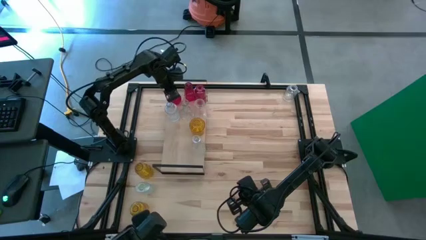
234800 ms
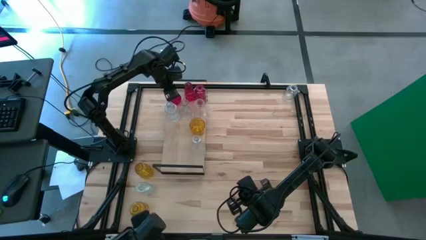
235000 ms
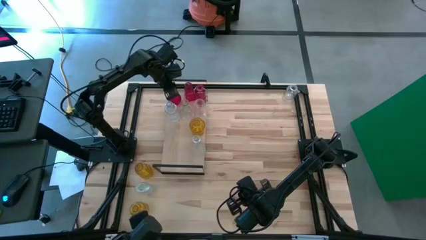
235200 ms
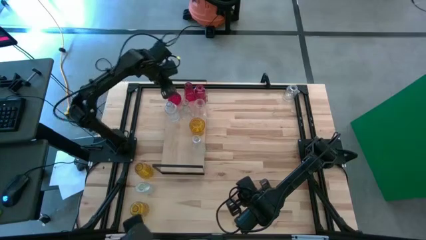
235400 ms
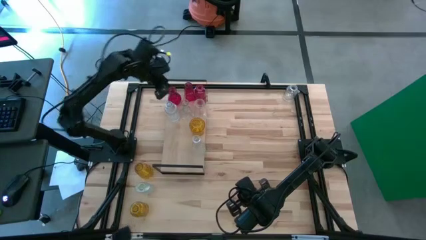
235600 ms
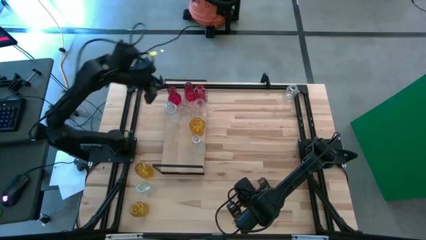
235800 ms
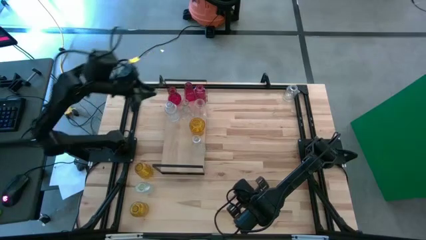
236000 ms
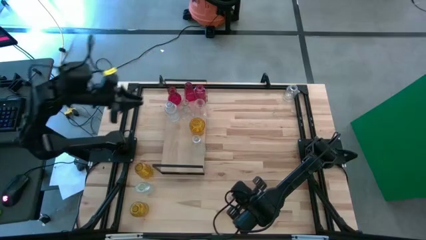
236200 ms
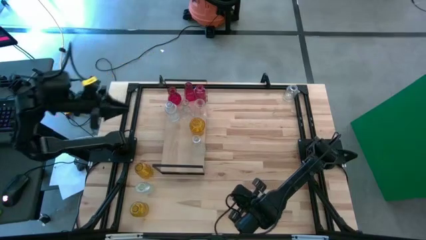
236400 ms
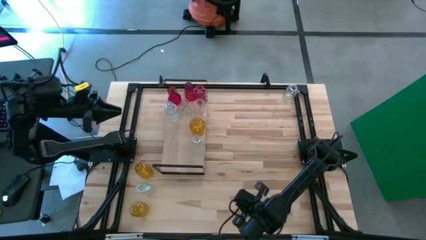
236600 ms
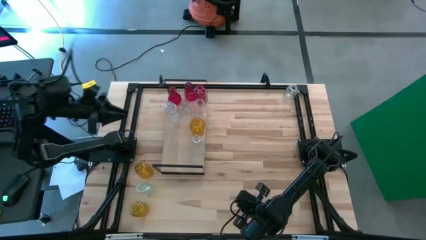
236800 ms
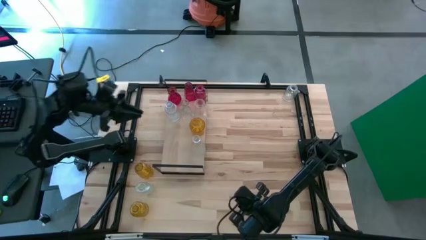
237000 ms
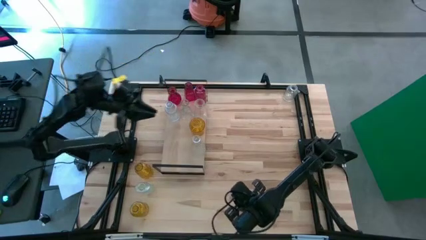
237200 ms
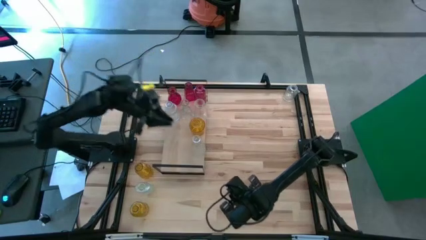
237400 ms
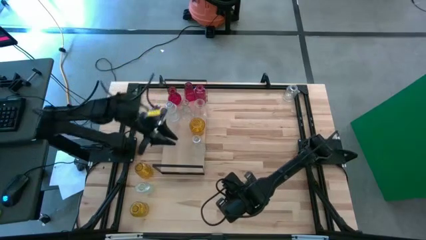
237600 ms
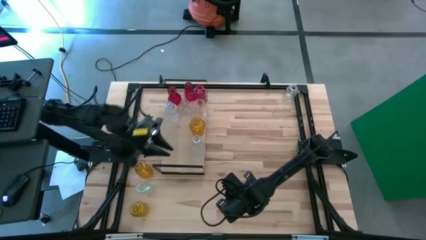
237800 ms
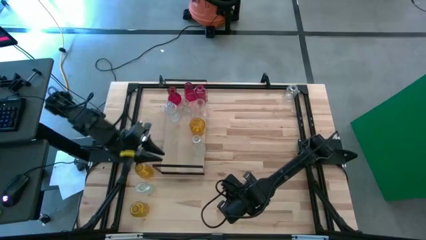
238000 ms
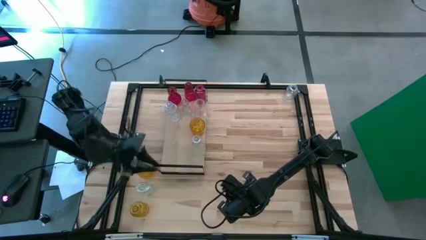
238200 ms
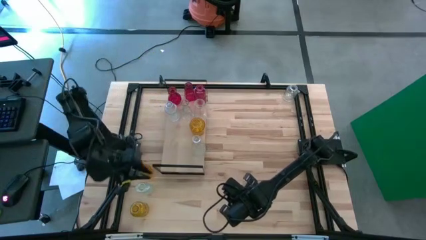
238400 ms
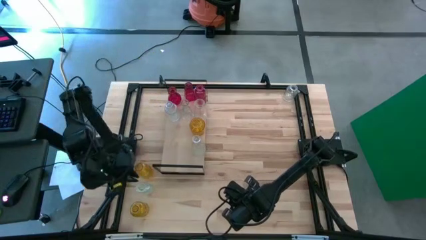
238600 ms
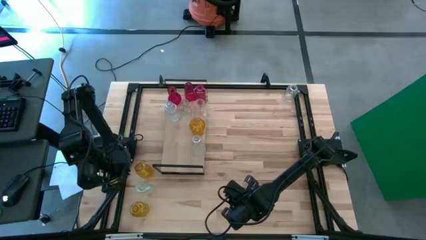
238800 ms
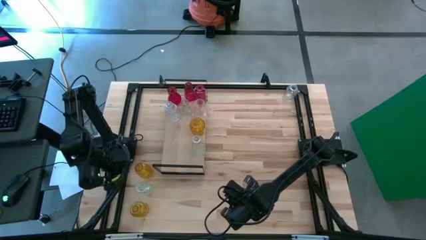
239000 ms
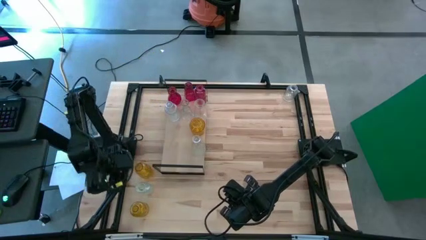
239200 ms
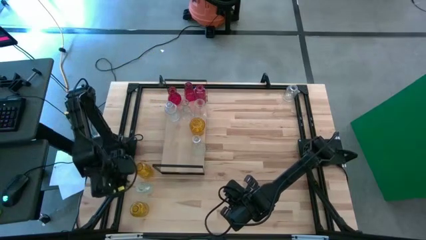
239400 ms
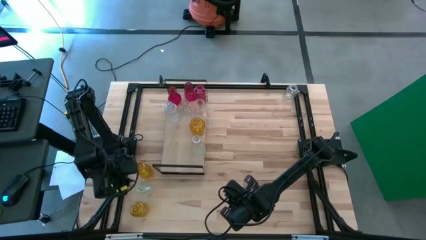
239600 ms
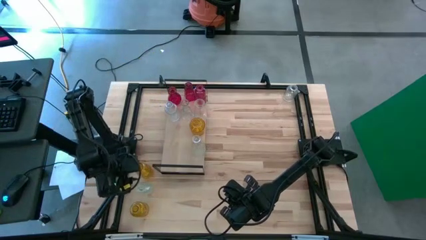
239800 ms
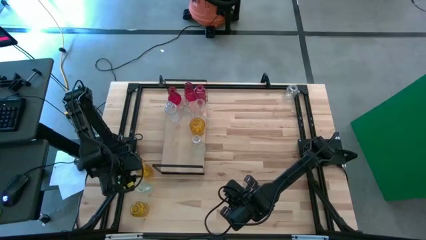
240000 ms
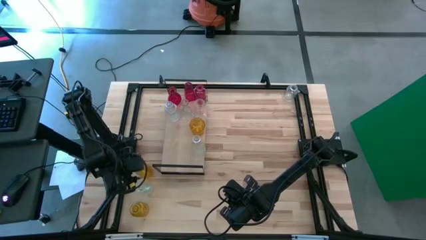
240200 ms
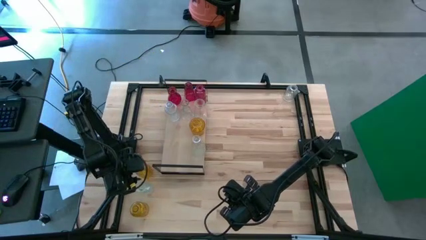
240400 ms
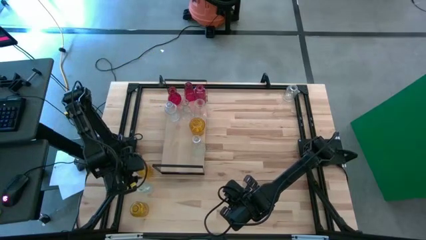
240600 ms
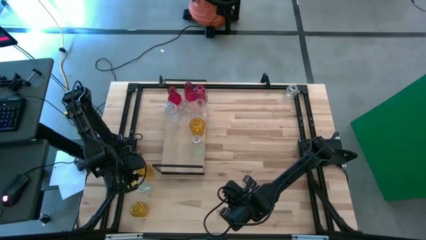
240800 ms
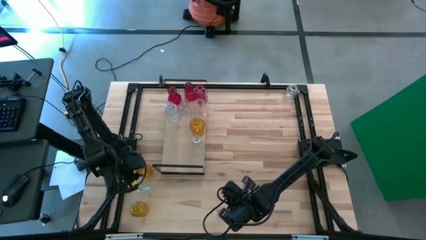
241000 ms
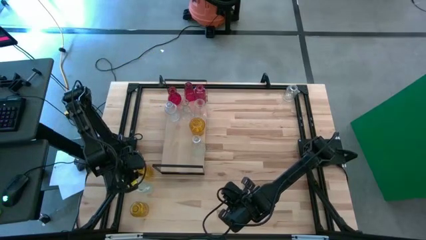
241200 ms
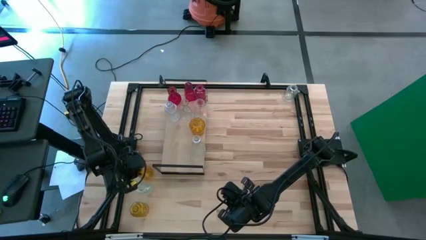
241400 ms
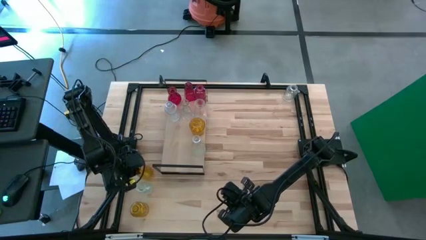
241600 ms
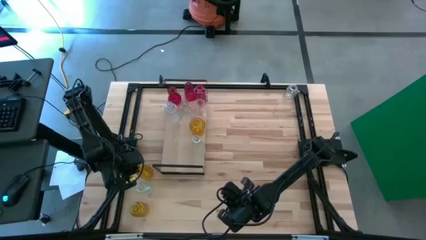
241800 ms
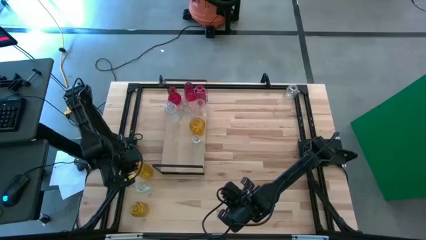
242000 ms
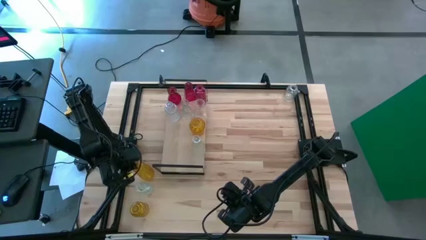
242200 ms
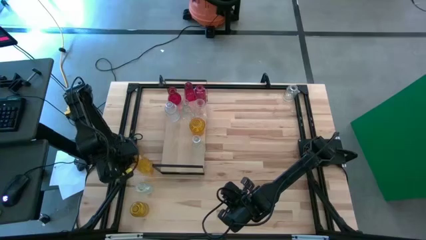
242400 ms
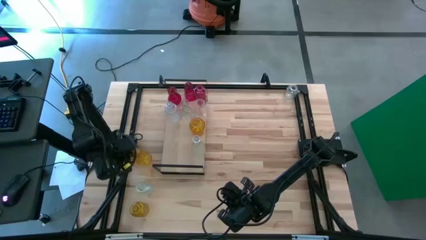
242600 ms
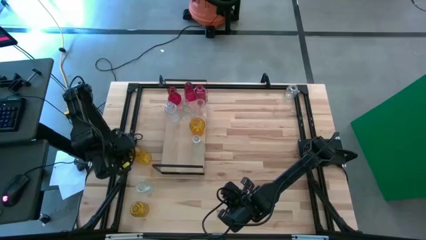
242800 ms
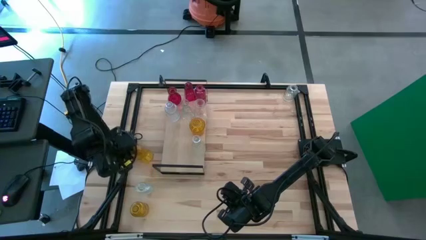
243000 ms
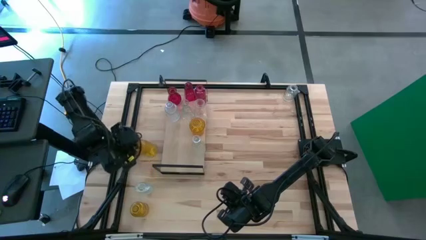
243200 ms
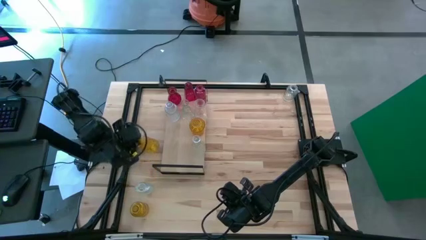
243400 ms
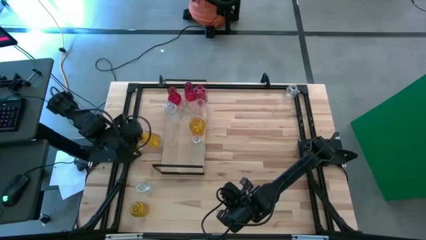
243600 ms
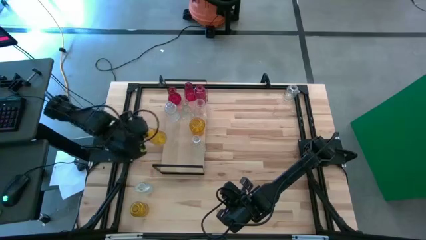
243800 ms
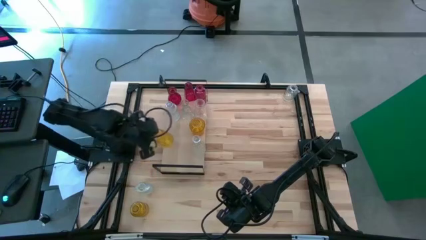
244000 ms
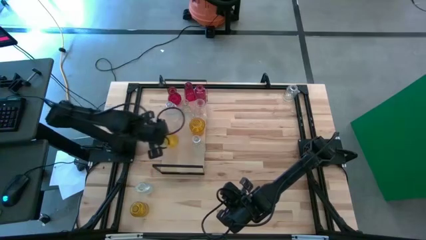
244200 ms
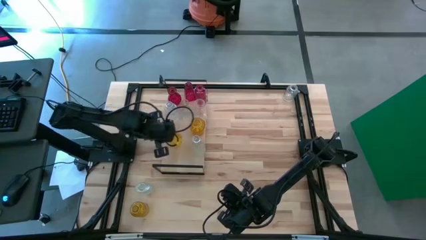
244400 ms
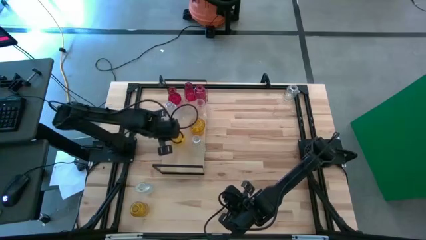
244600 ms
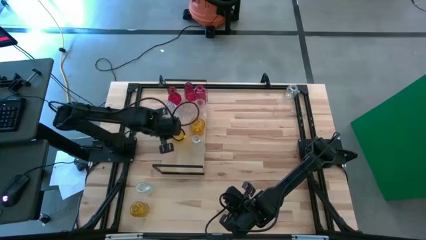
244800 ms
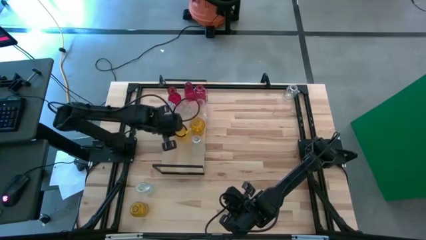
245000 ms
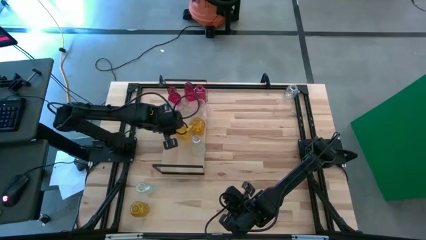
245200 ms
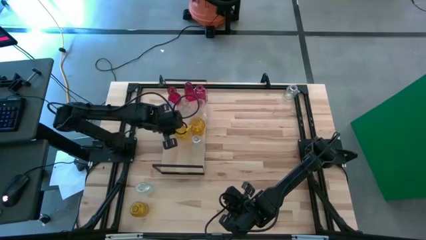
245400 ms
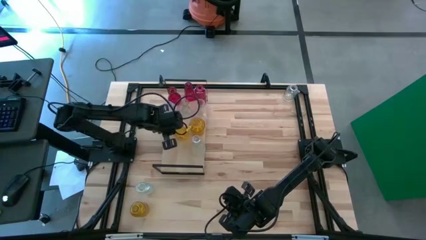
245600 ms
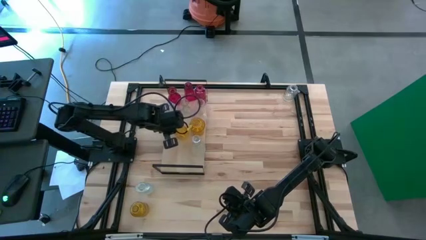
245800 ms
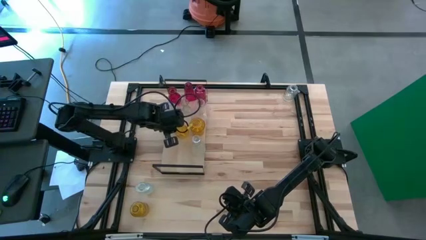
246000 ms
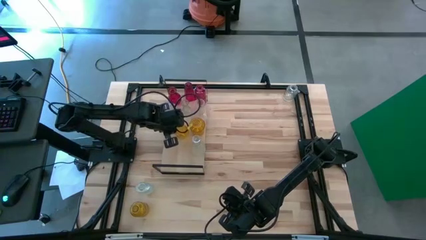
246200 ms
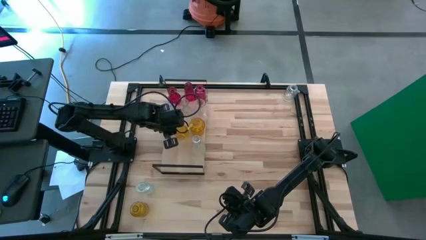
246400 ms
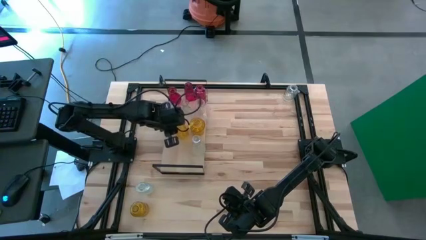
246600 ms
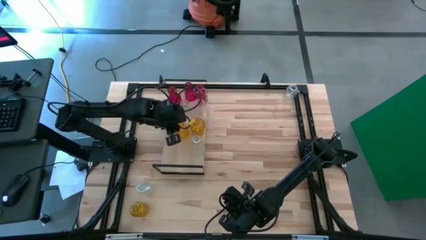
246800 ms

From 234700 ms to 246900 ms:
Task: sort vases onto shelf
Put the top yellow vase on the shelf aligned with the other yellow vase
